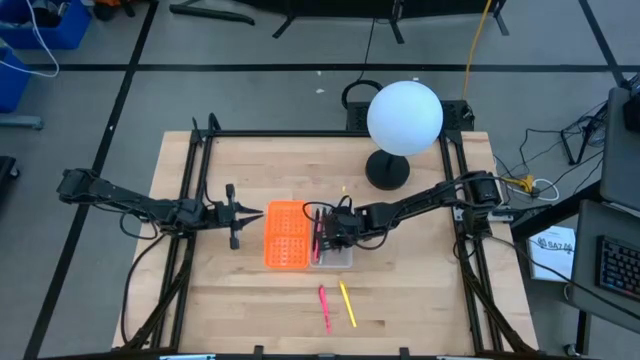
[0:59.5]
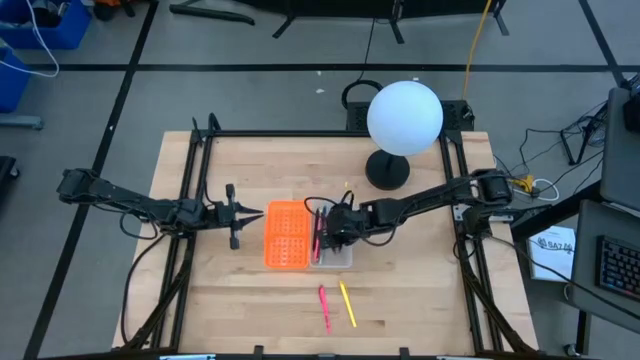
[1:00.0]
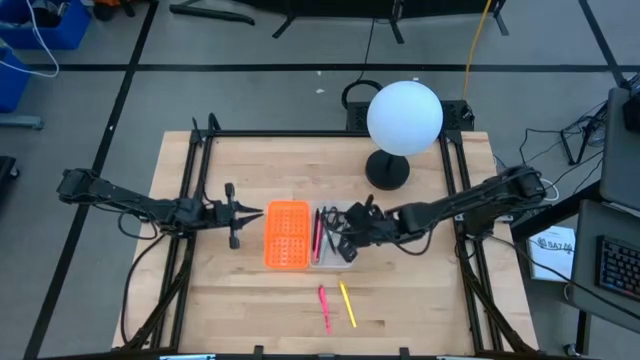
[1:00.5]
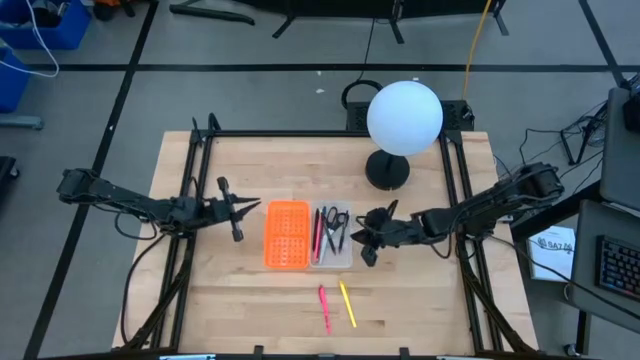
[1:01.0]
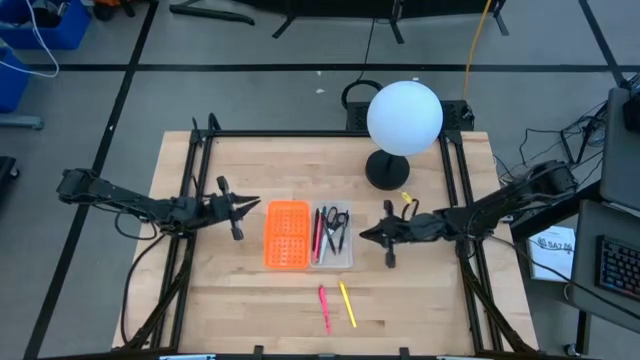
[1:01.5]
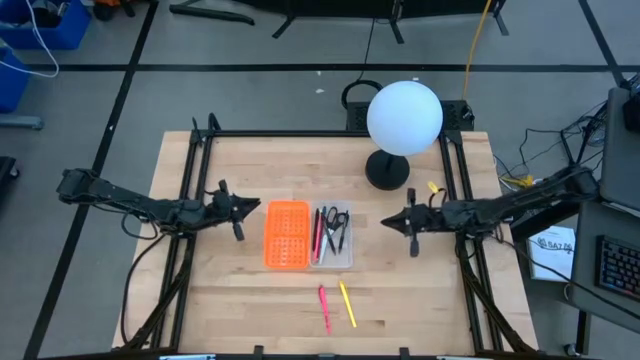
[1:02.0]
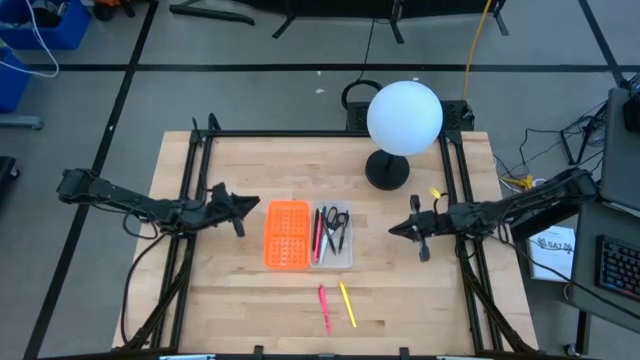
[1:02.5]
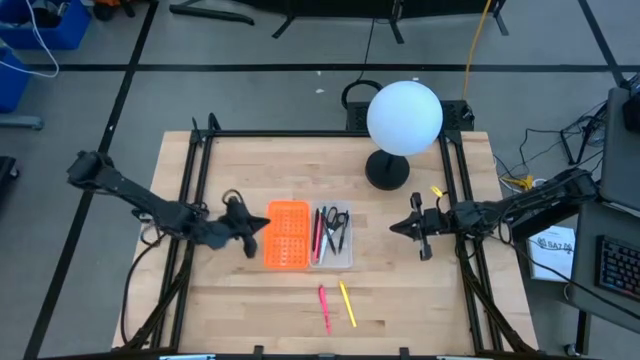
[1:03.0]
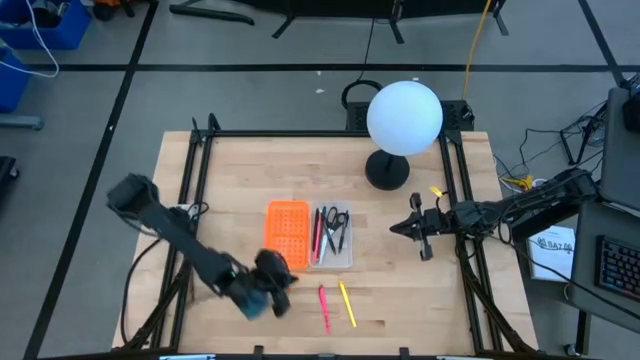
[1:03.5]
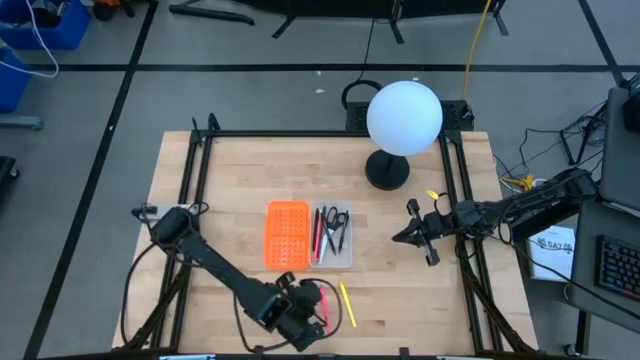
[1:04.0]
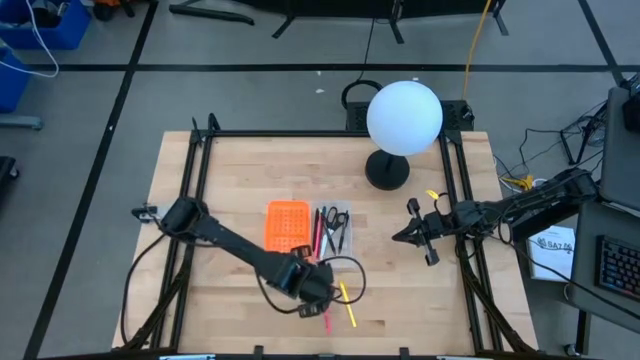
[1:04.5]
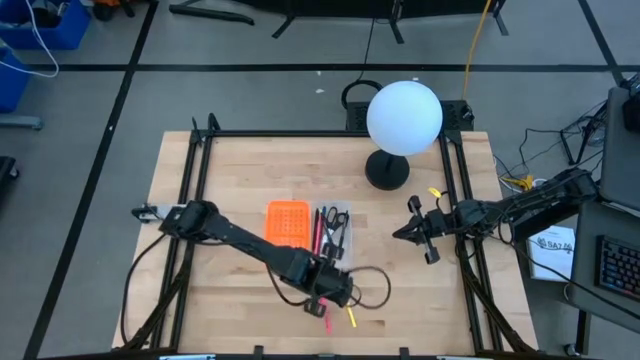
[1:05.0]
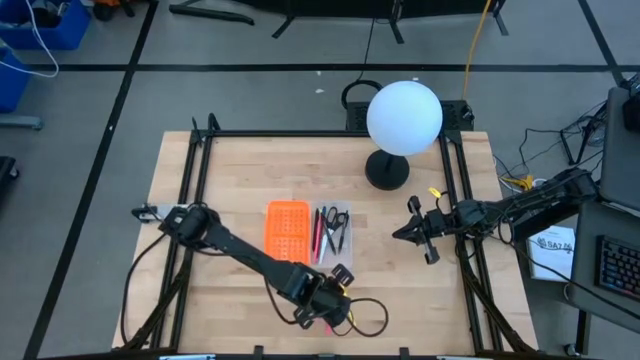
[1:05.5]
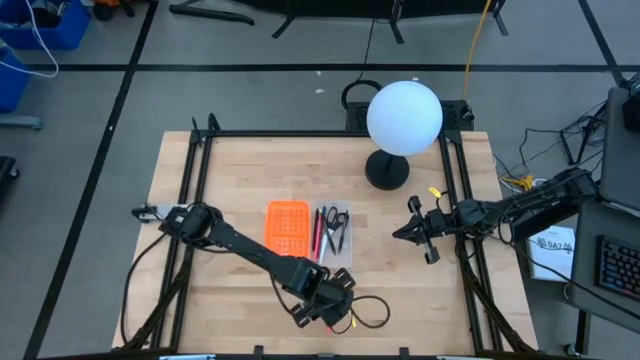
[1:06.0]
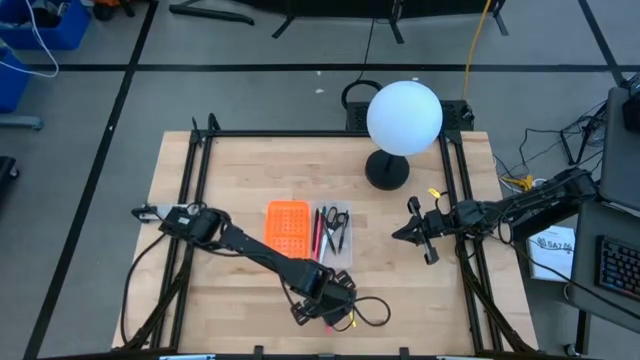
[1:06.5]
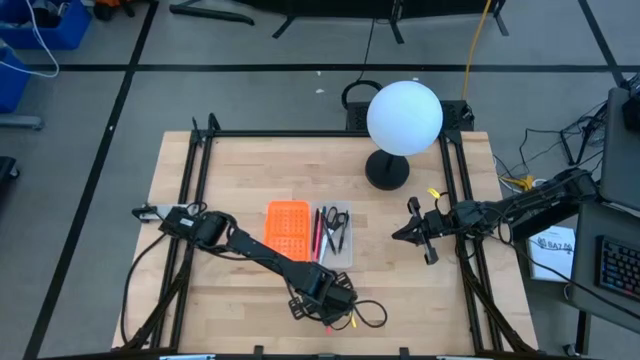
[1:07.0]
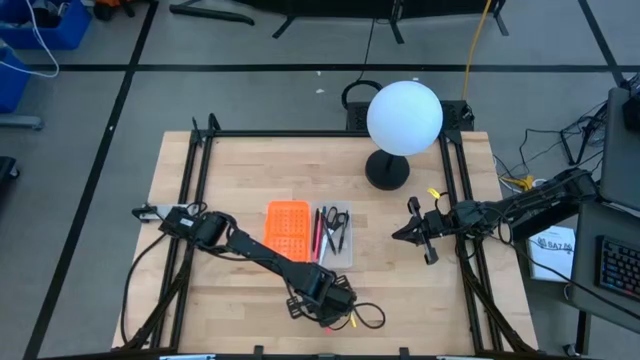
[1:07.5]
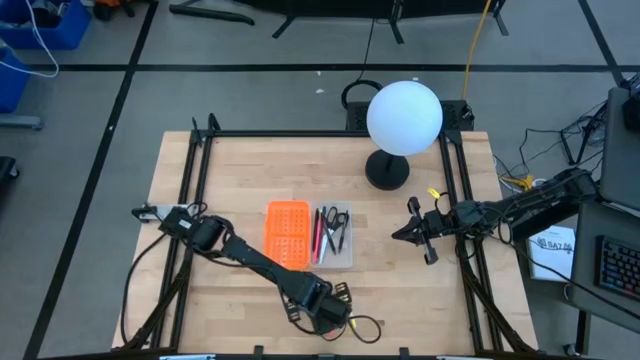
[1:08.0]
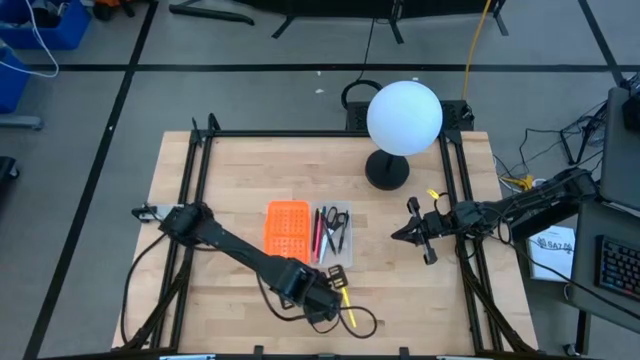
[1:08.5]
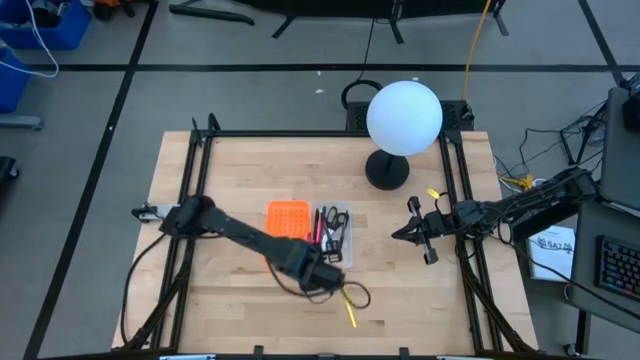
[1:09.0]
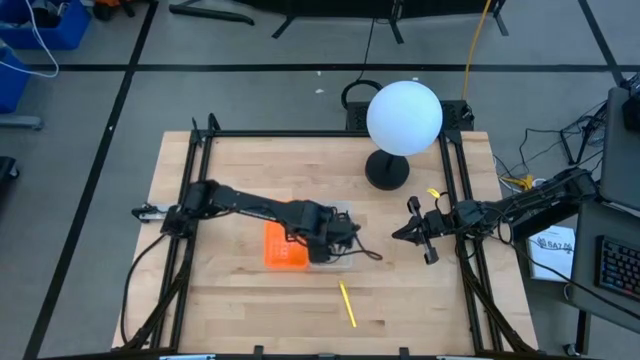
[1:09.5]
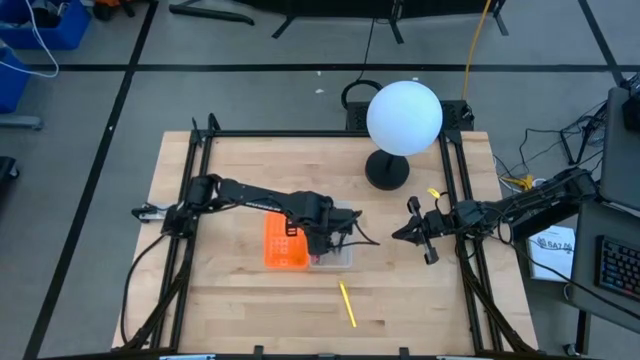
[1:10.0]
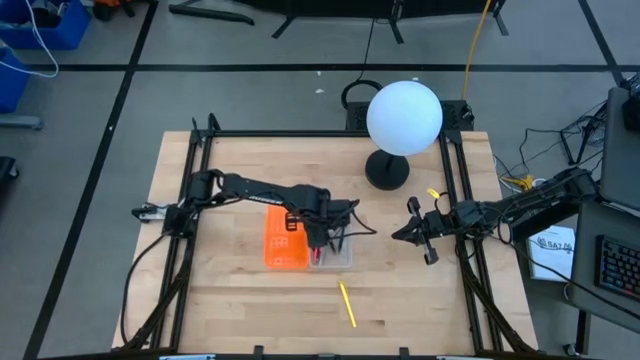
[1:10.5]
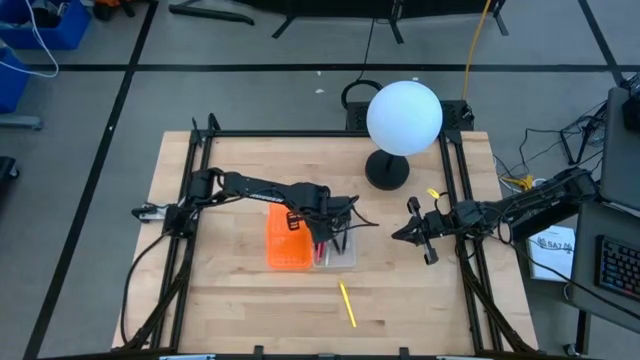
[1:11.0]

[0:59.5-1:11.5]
Task: Pick & place school supplies into a supply box
Put the pink pen into the orange supply box

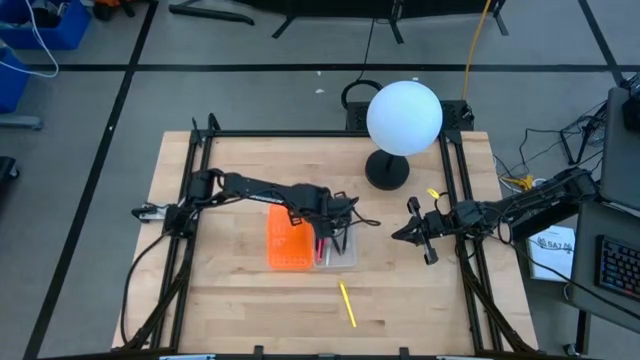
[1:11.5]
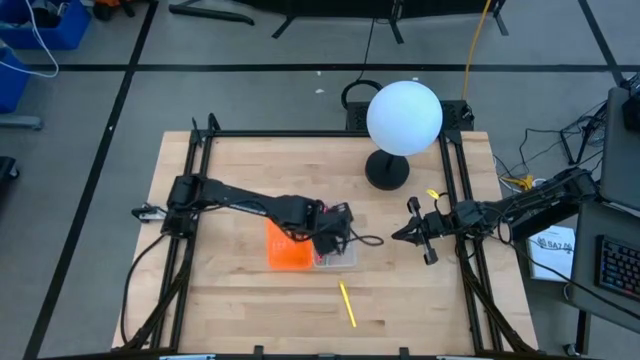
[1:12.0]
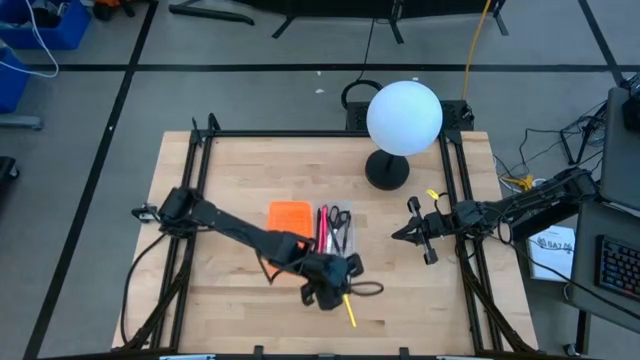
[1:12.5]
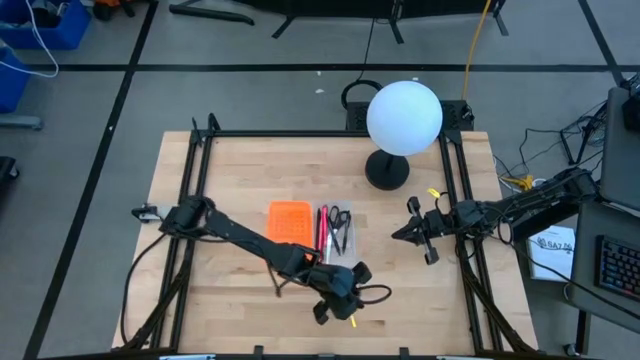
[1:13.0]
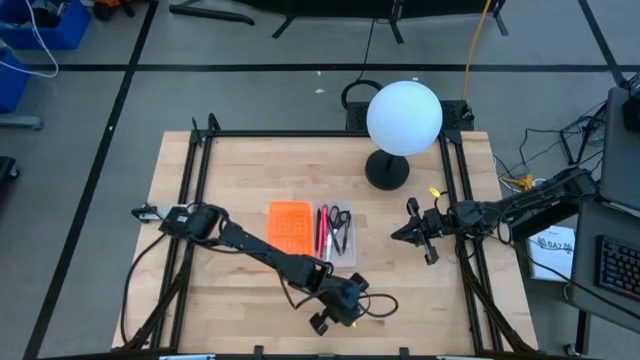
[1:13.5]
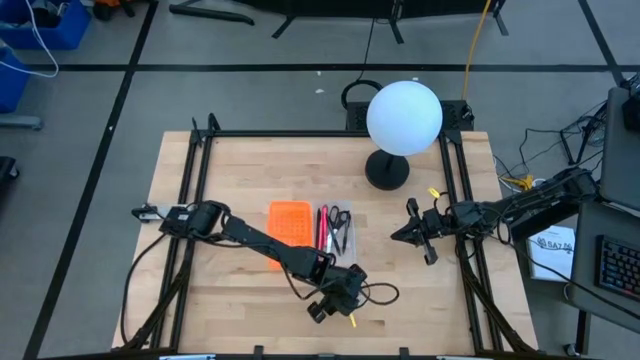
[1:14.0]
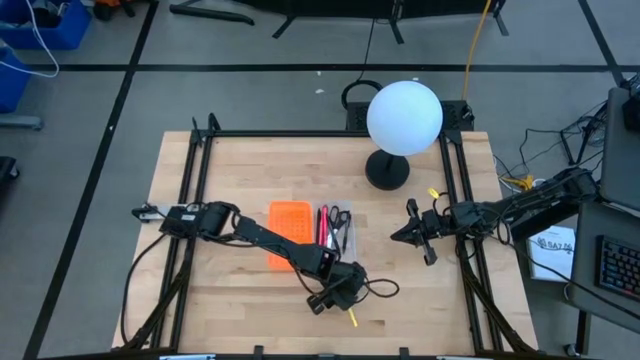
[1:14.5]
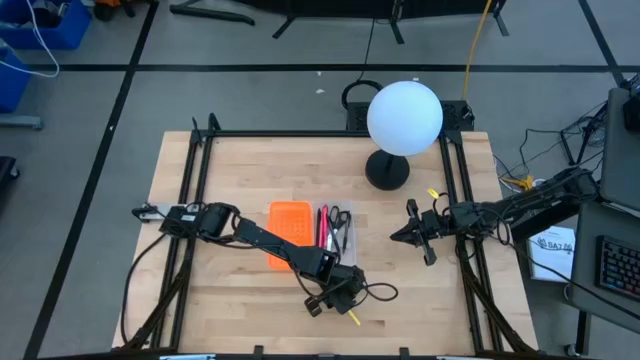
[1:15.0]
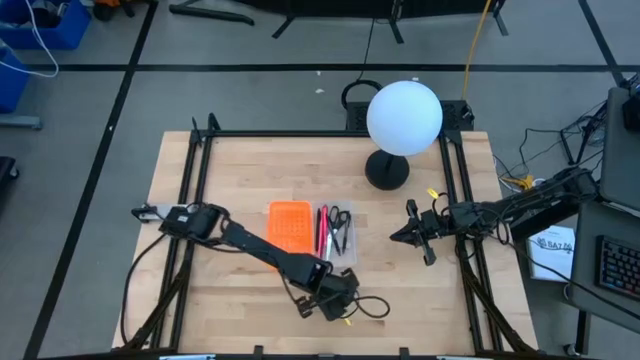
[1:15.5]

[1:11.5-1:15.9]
Put the yellow pen into the orange supply box

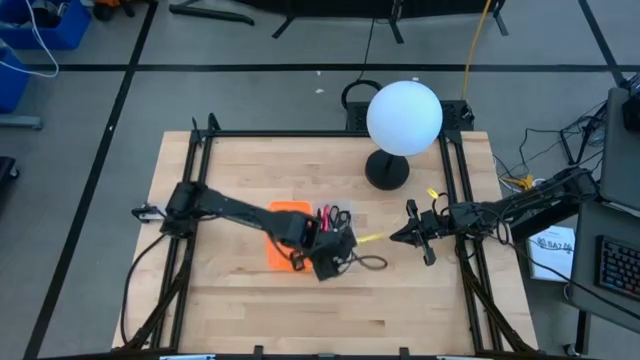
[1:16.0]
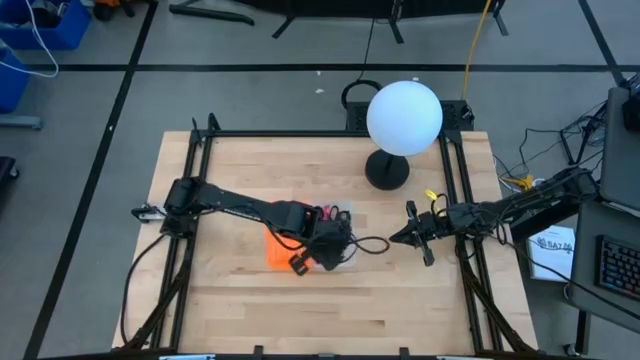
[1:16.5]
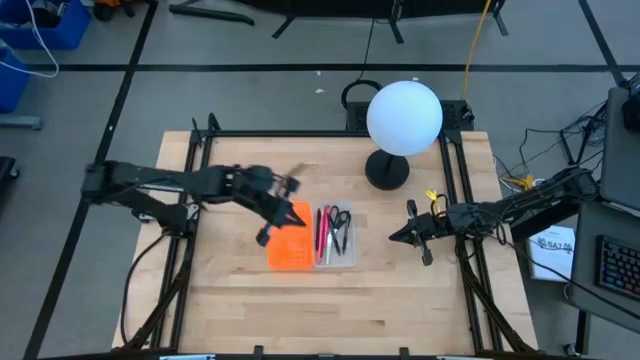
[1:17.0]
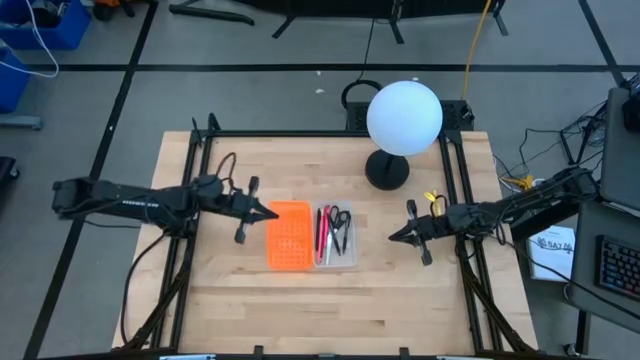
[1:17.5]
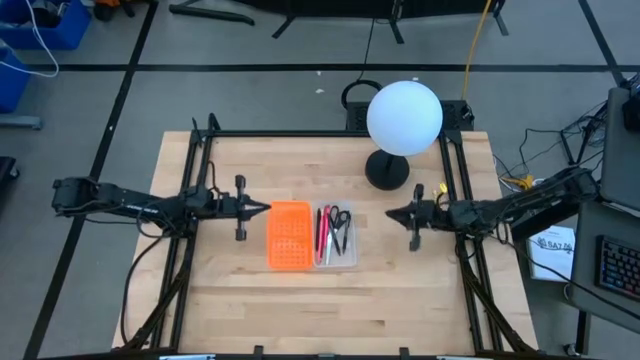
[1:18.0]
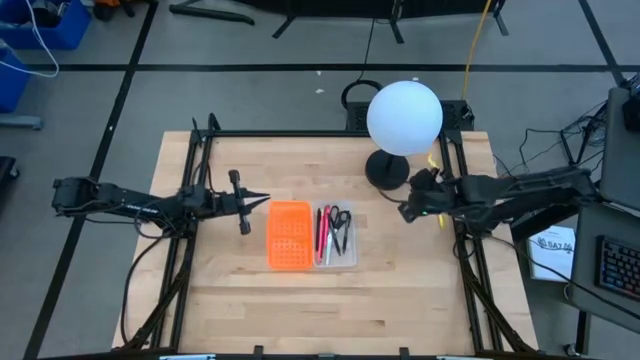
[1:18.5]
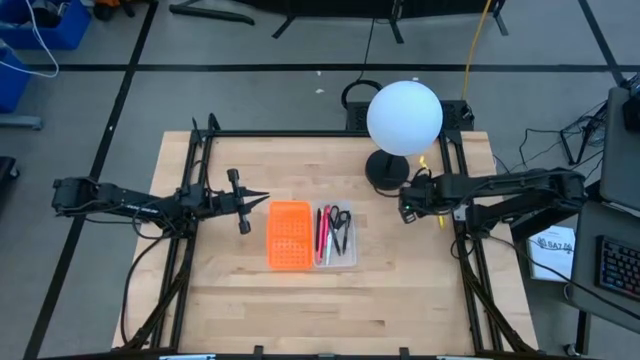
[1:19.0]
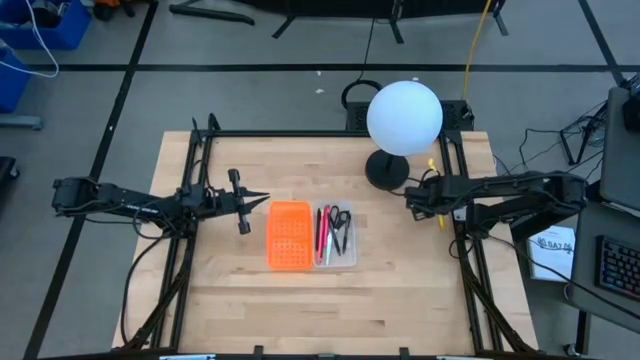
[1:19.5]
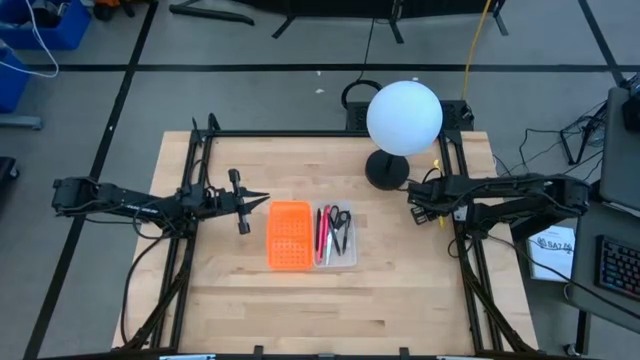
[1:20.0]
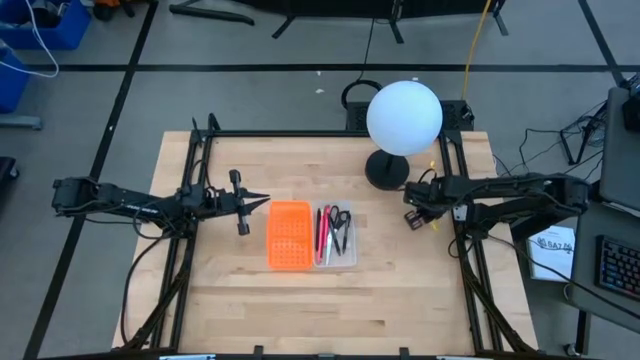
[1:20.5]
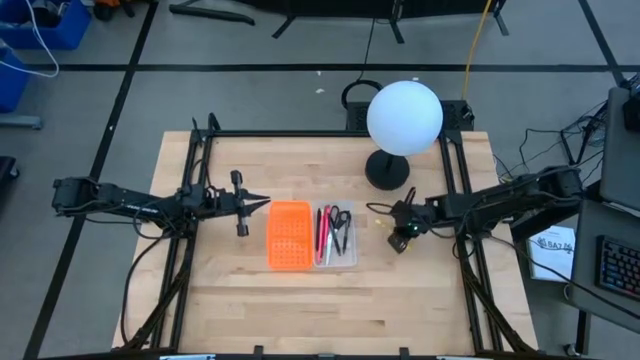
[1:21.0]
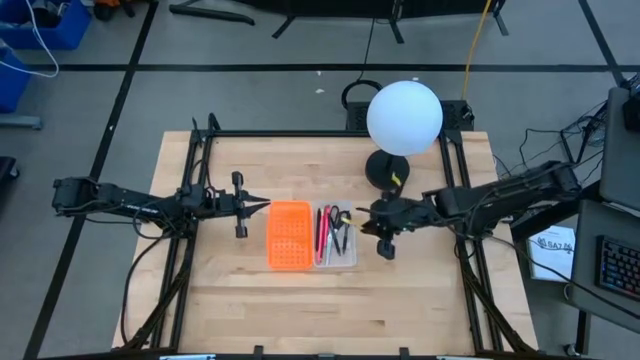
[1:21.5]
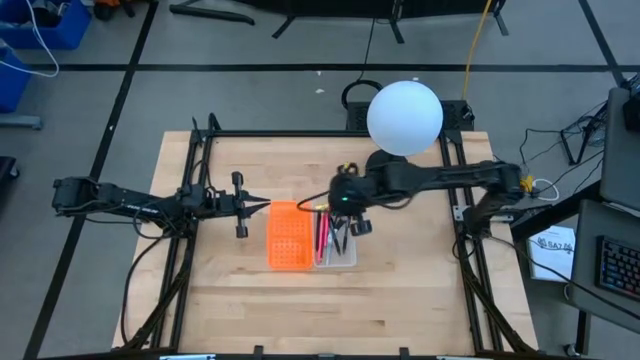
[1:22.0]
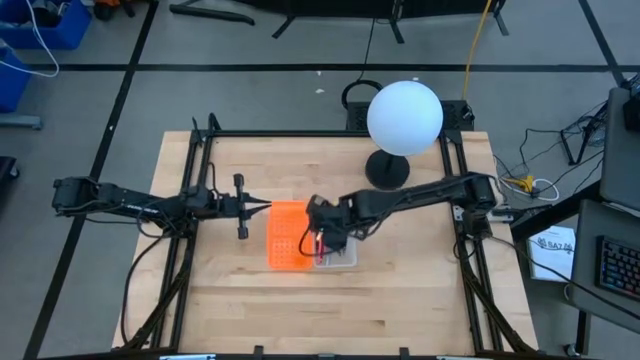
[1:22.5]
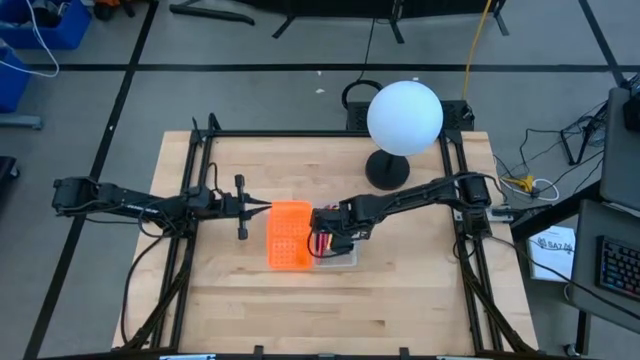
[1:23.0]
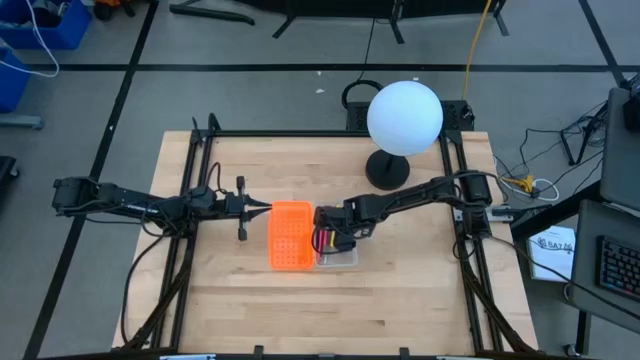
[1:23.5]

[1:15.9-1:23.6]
Put the yellow pen into the orange supply box
